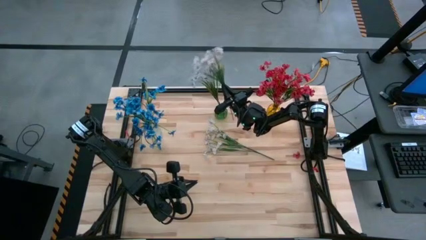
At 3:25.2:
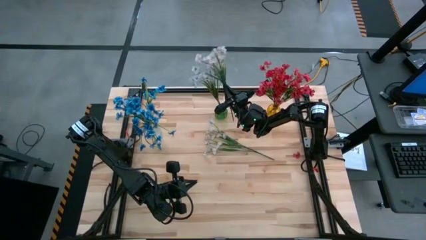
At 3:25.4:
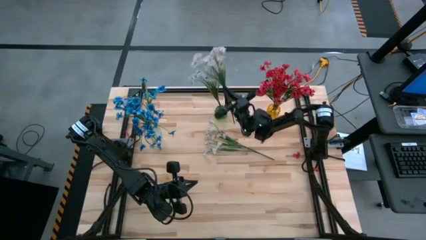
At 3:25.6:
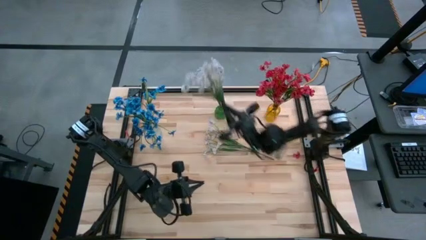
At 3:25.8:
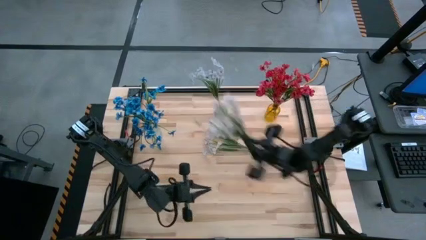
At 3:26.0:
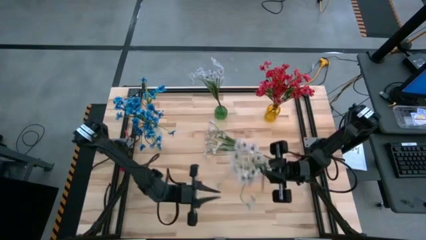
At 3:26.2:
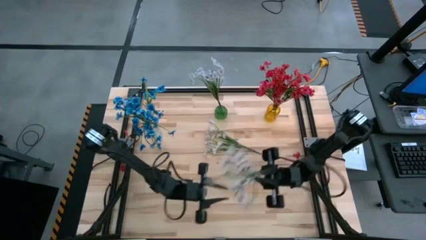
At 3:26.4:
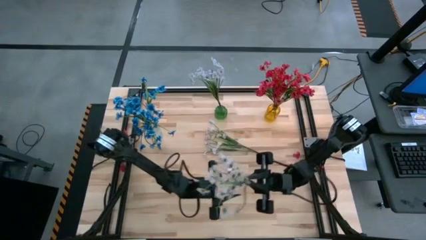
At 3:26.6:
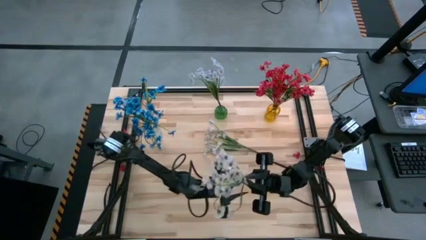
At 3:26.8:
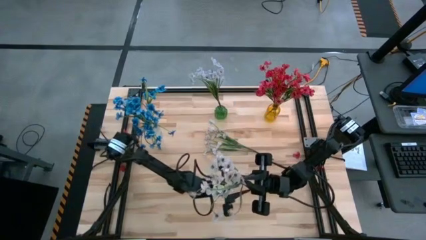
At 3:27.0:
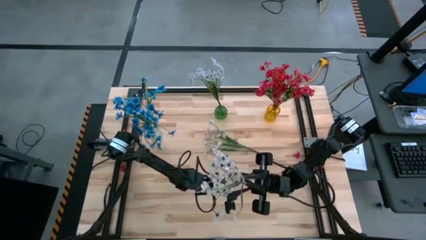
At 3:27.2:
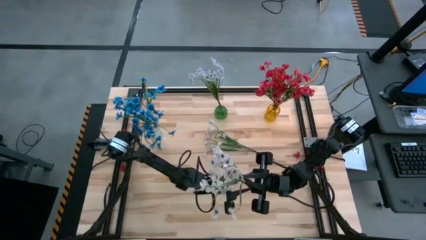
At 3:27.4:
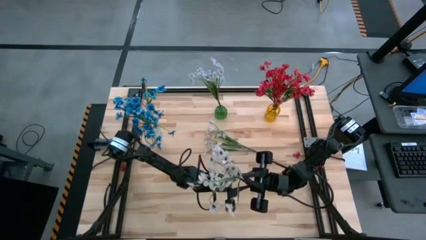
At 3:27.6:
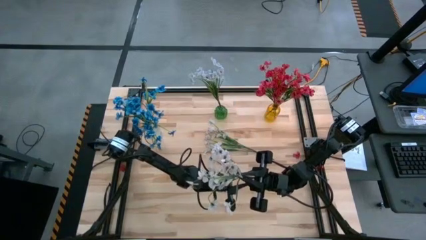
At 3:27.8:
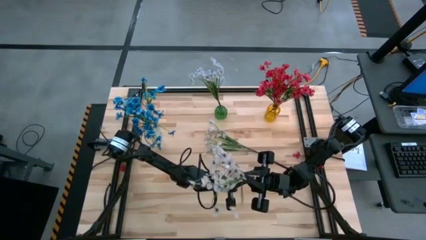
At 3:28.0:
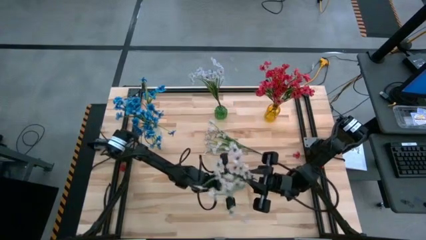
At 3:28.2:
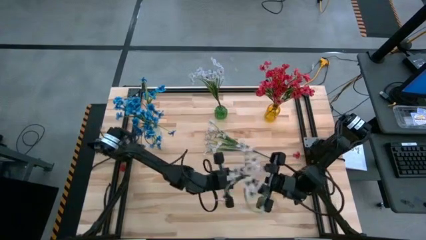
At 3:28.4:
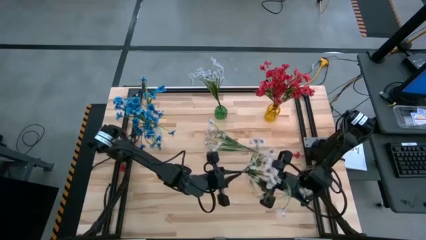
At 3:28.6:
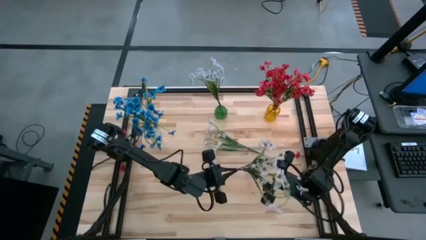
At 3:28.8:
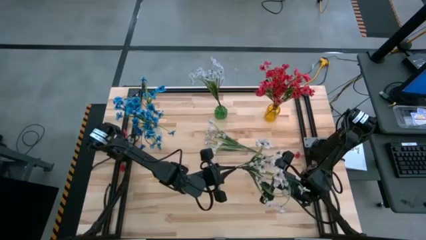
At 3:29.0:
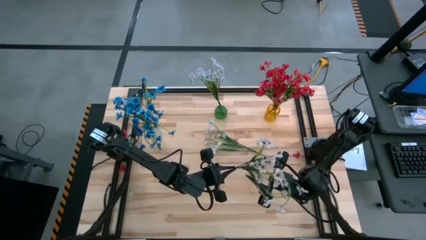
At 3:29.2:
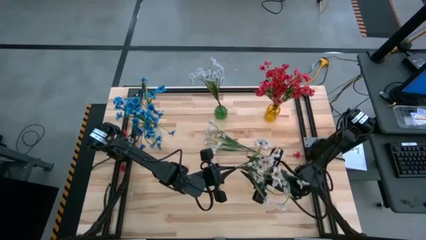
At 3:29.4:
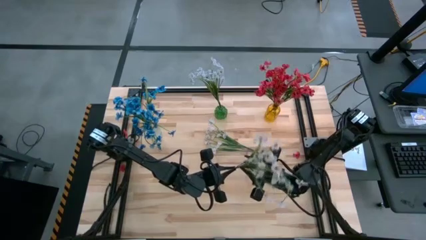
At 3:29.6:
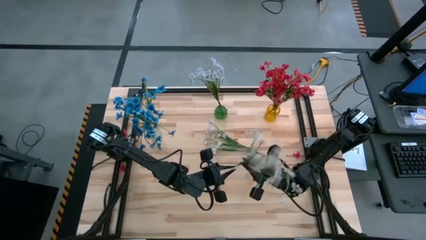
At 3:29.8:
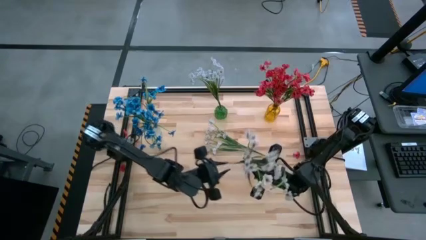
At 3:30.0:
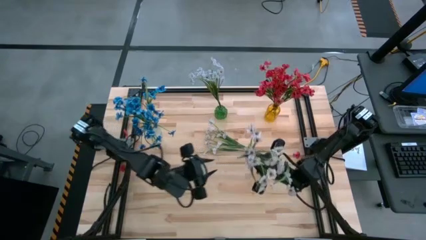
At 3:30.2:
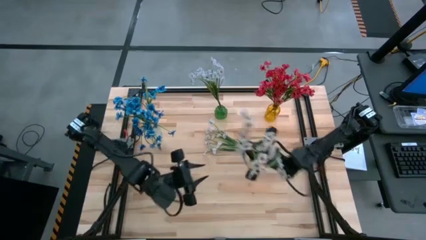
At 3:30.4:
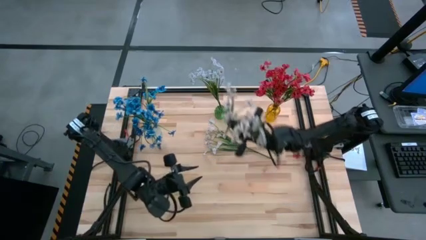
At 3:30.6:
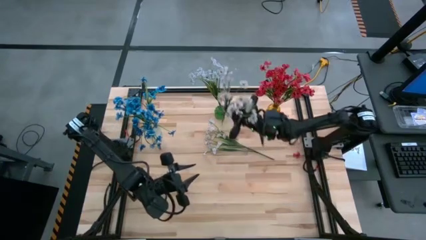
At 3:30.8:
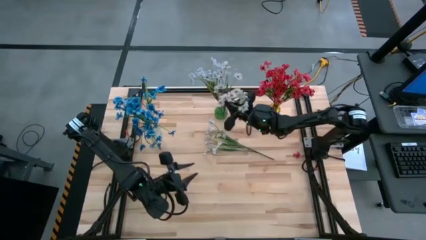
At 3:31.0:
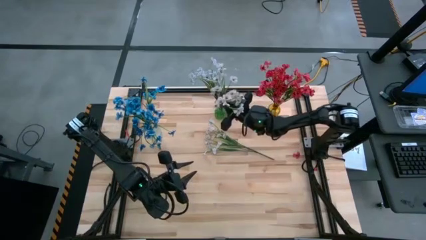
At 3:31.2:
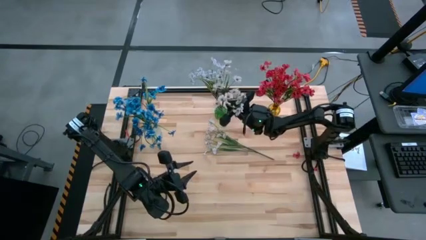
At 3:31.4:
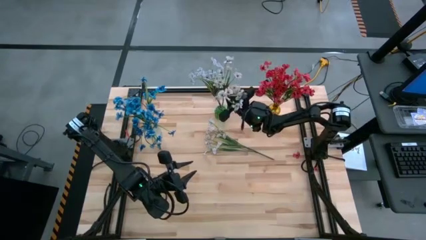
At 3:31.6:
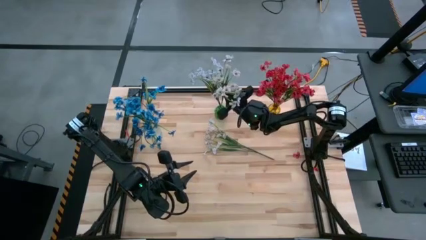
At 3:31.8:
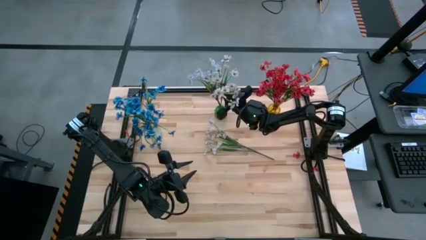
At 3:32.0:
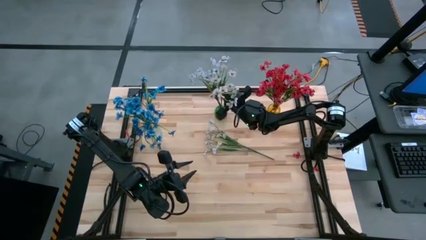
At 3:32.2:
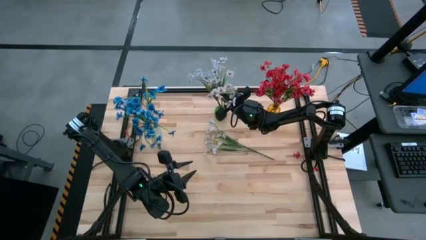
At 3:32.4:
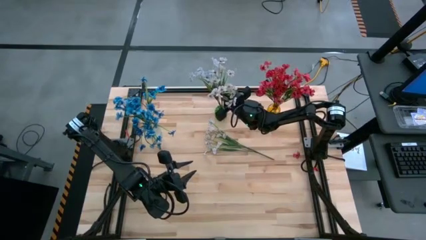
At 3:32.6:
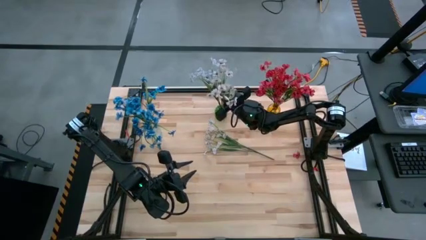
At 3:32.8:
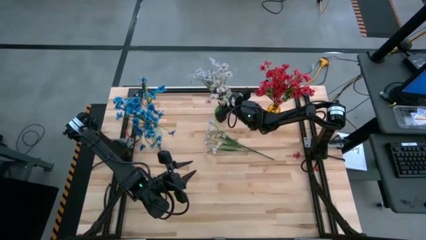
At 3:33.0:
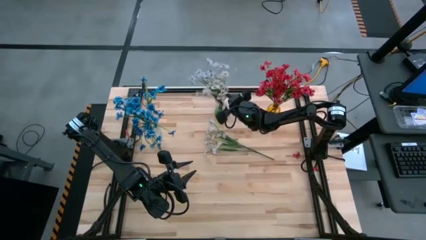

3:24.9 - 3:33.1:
Task: Sort flowers into vase by color
Put the white flowers into the green vase

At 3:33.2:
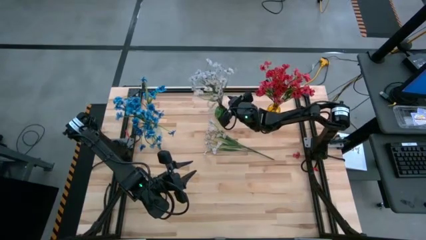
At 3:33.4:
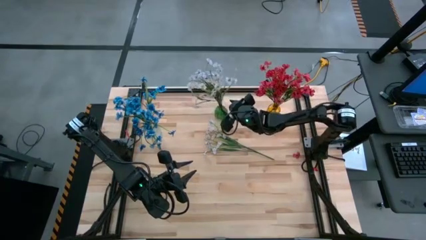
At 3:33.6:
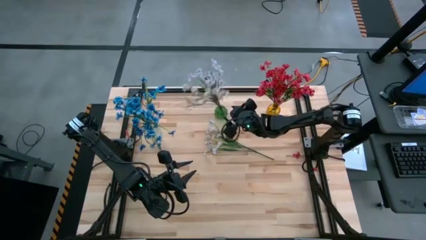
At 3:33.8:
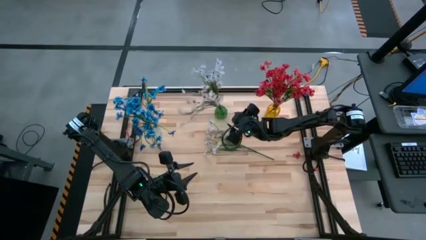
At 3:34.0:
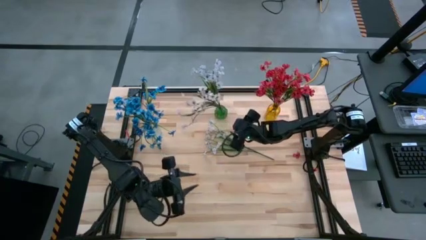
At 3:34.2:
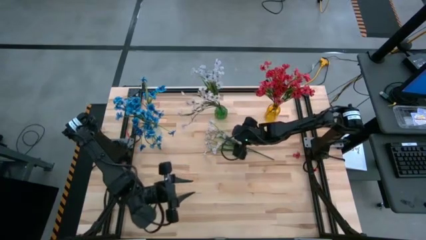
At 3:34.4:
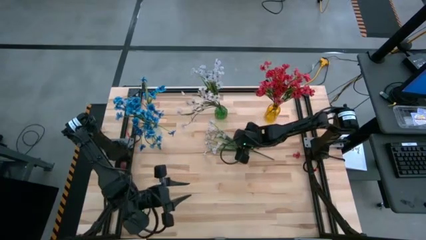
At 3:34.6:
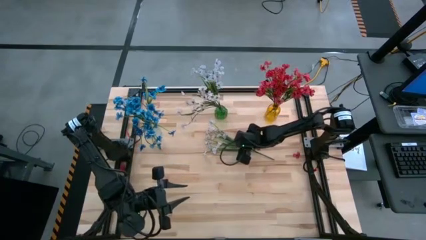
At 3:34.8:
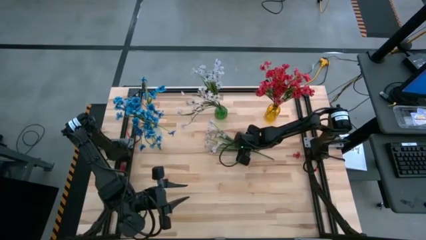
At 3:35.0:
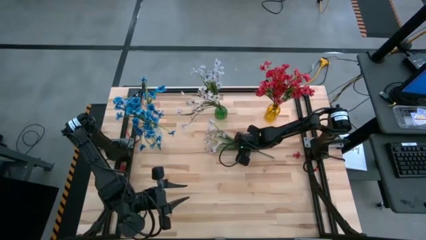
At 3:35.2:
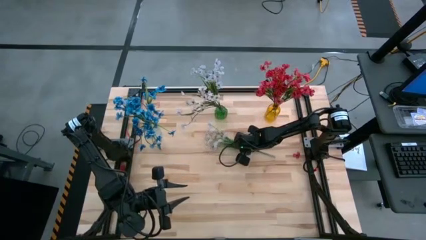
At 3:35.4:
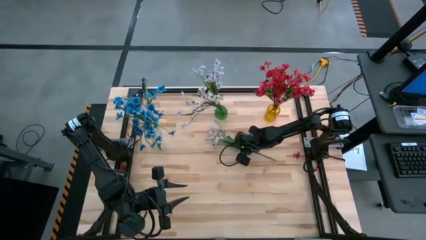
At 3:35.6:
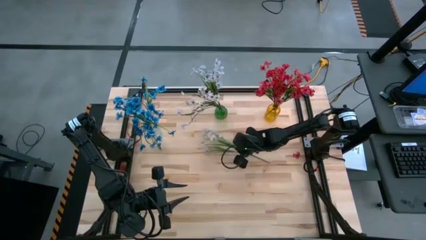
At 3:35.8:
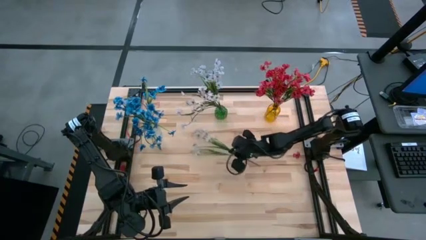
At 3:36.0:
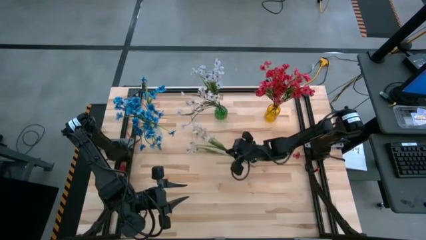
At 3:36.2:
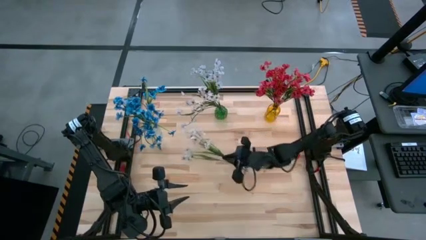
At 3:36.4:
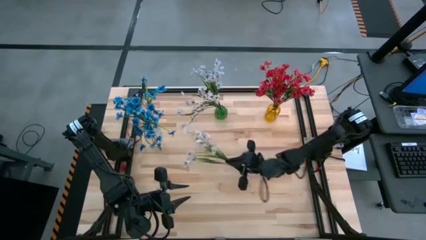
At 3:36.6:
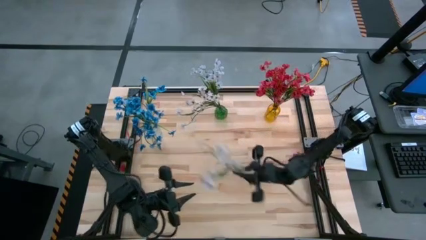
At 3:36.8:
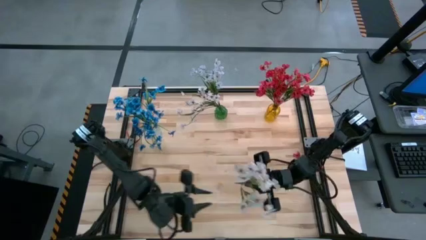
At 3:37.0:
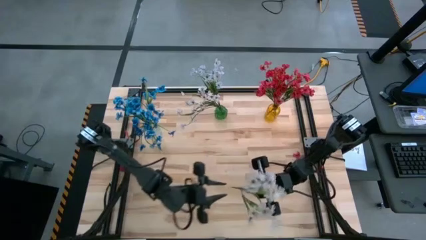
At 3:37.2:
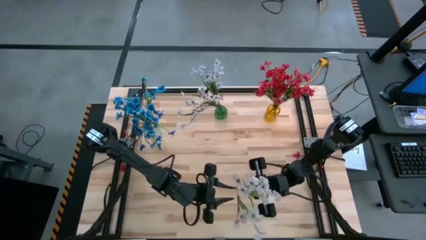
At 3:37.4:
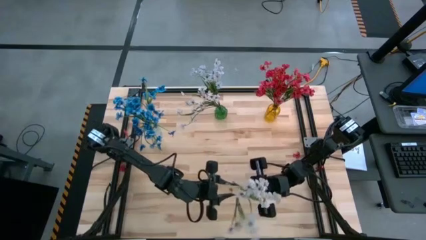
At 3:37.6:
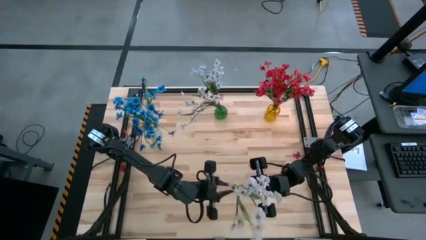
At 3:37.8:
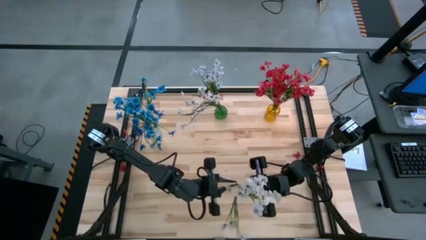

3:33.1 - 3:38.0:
Put the white flowers into the green vase

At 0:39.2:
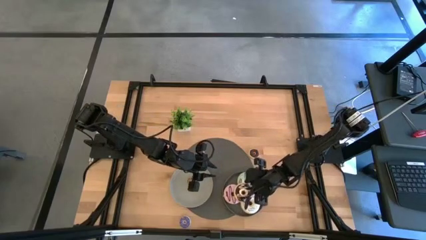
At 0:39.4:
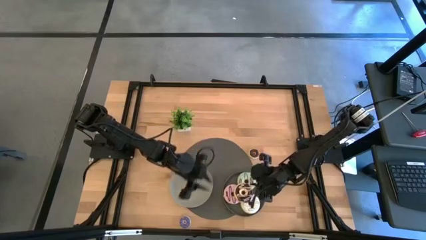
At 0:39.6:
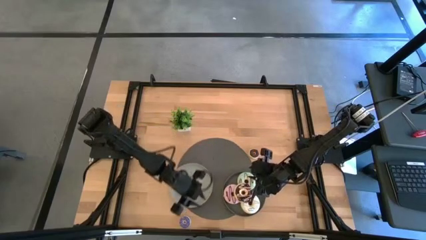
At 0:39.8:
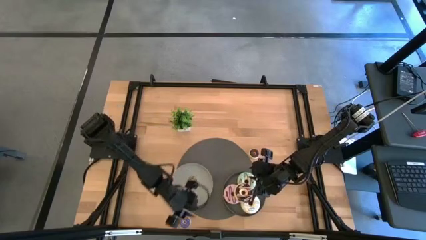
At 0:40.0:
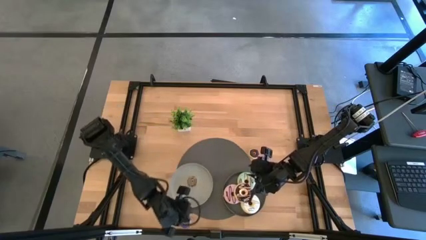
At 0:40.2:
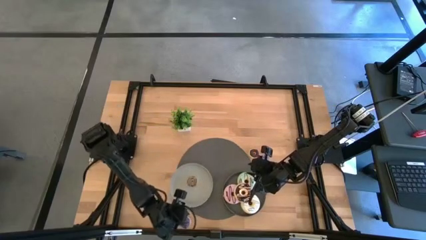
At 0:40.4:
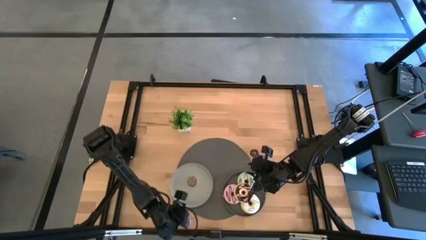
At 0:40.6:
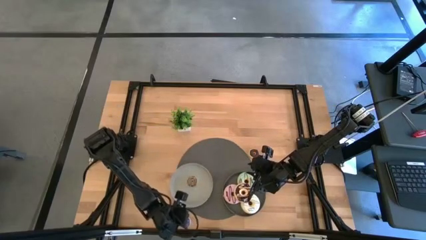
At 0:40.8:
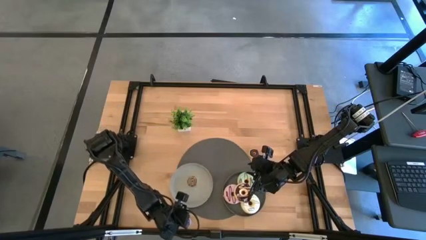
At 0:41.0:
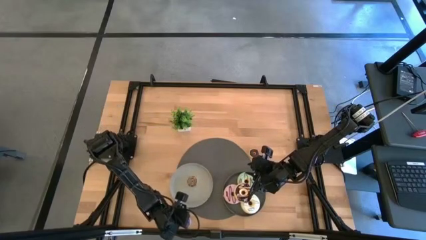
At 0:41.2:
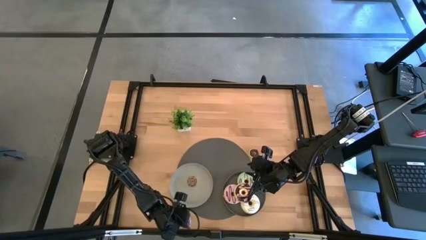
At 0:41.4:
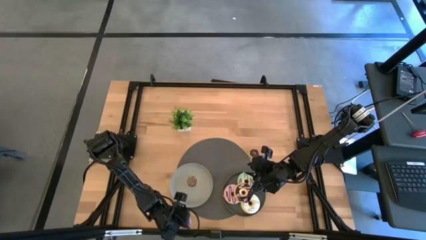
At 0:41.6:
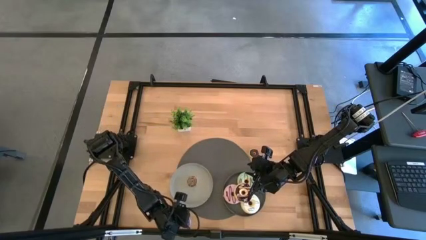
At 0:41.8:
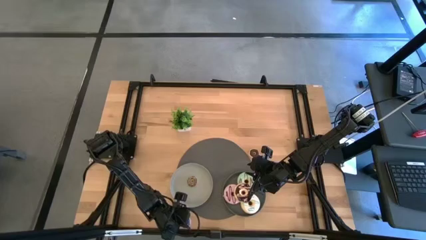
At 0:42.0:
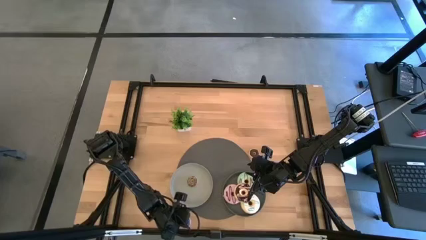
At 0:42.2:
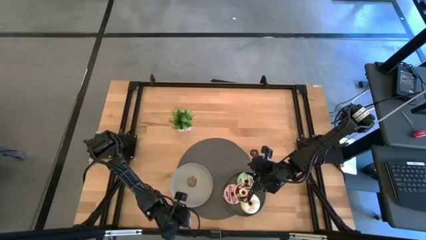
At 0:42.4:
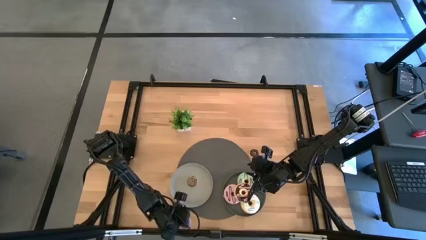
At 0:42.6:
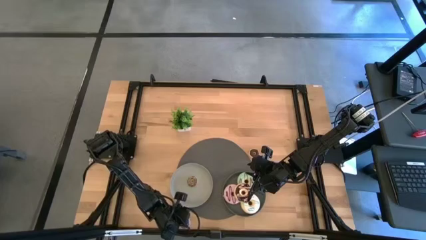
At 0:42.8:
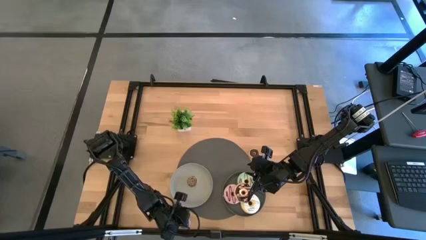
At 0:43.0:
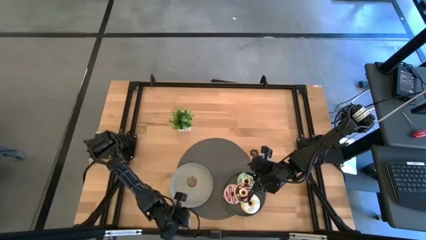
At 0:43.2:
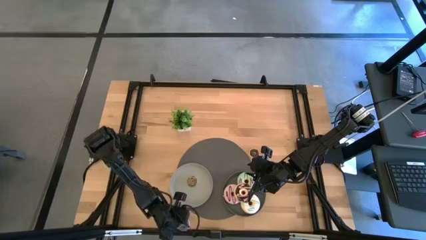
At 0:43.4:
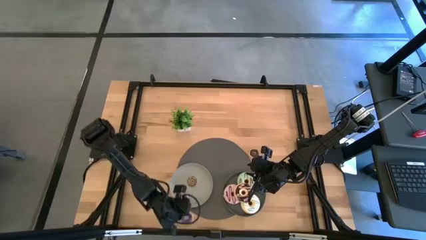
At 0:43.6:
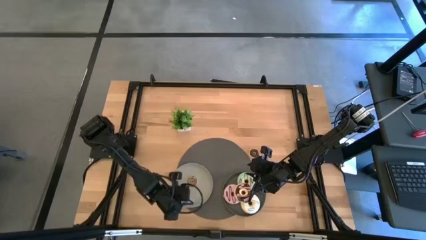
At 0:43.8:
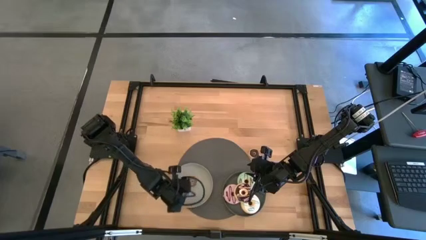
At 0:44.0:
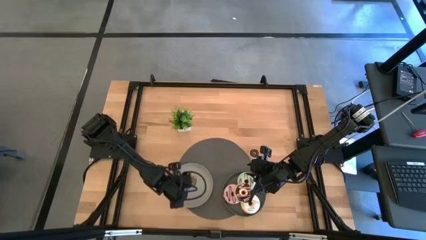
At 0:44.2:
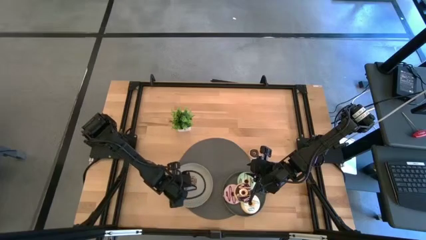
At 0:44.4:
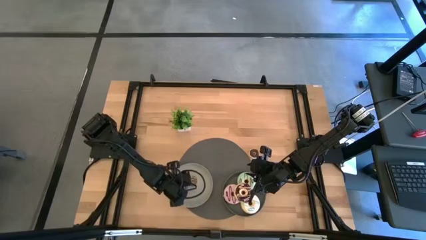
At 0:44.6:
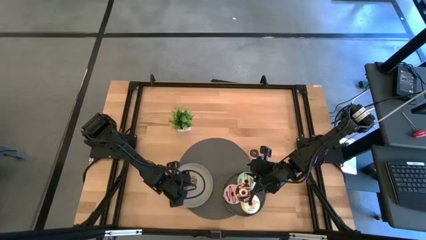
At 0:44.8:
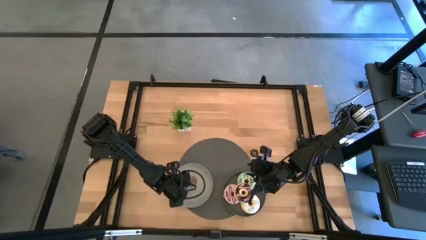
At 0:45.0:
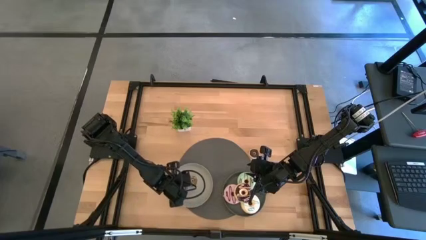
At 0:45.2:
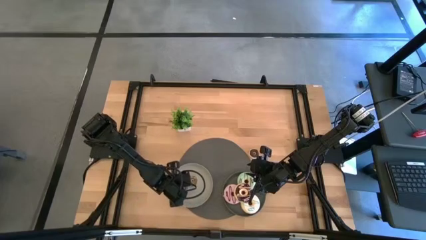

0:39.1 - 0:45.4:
Task: Pick & Place donuts
Put the small purple donut on the light grey plate
